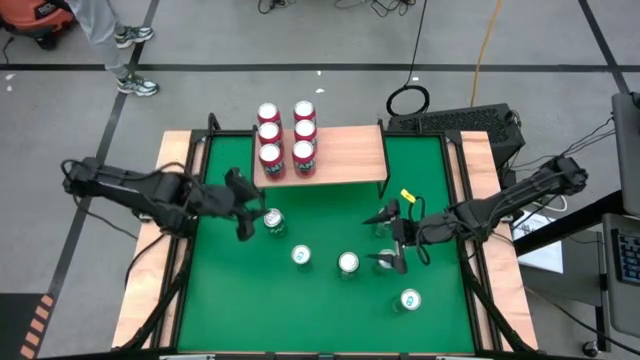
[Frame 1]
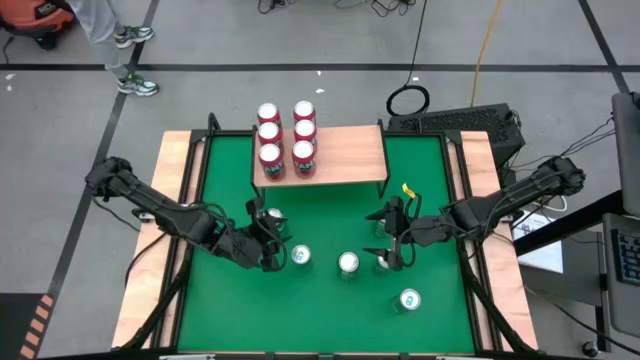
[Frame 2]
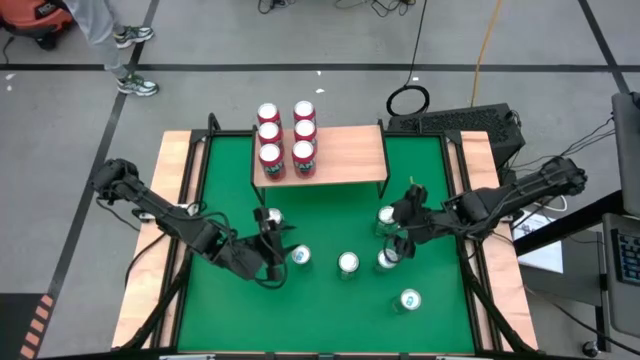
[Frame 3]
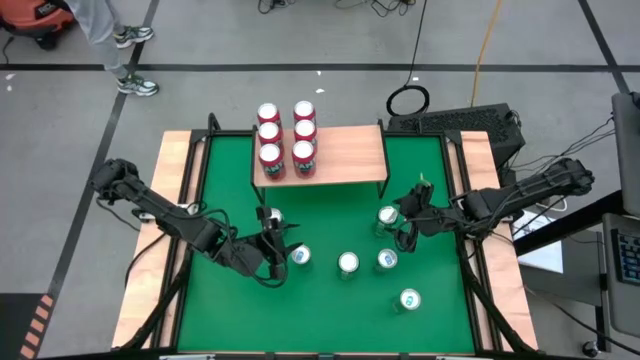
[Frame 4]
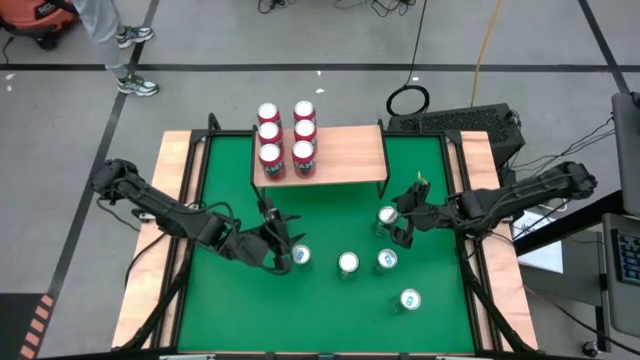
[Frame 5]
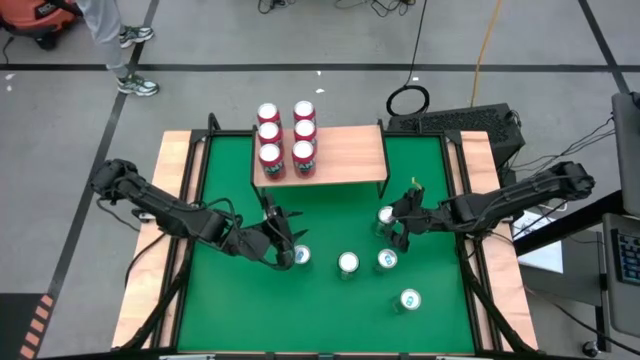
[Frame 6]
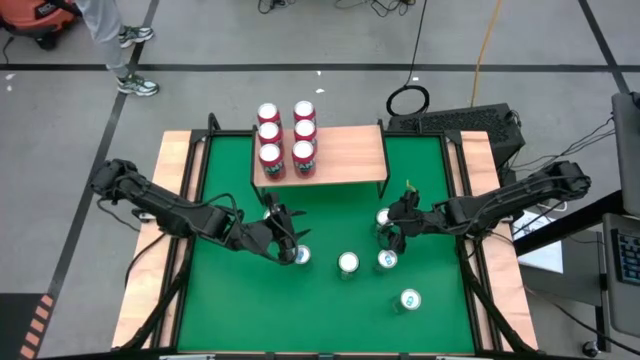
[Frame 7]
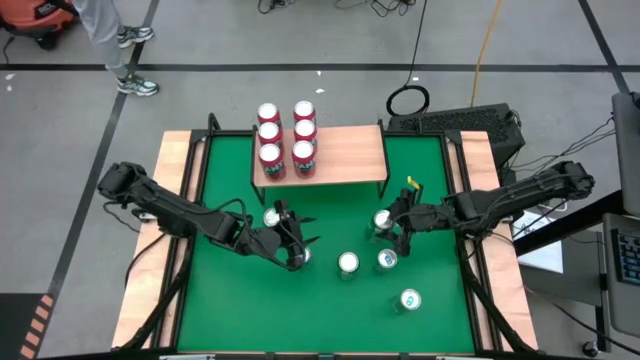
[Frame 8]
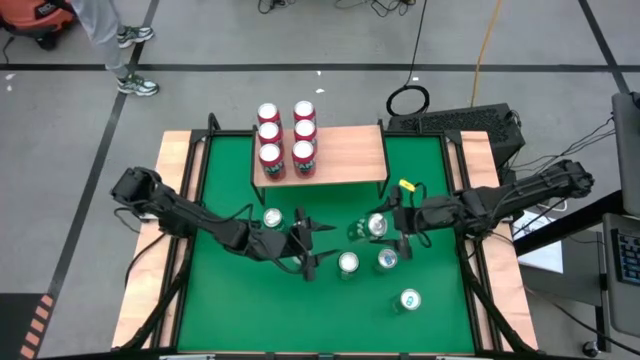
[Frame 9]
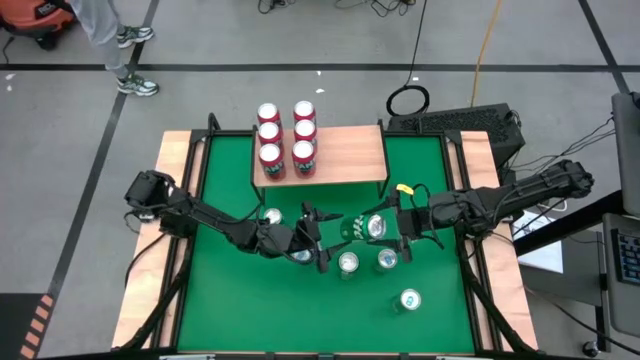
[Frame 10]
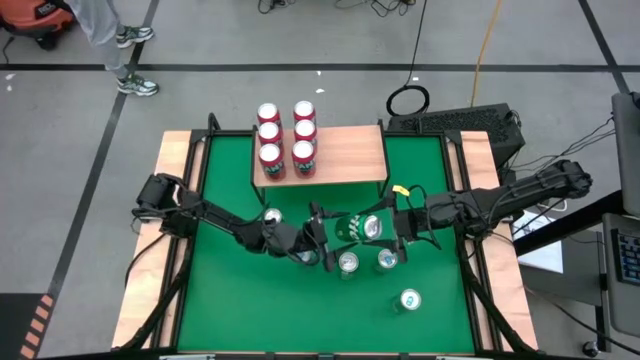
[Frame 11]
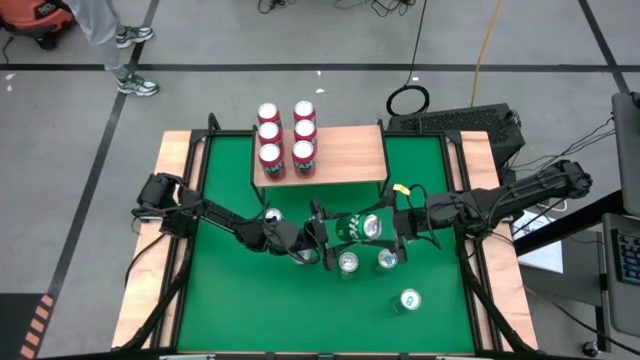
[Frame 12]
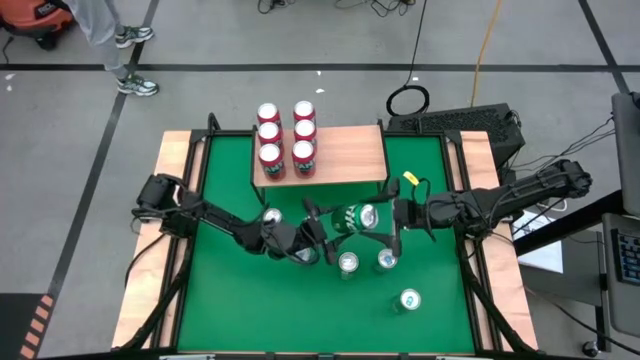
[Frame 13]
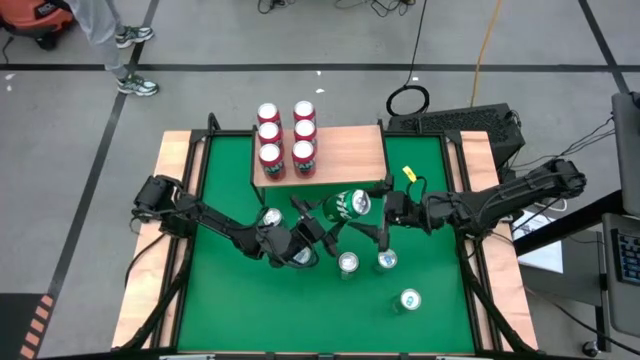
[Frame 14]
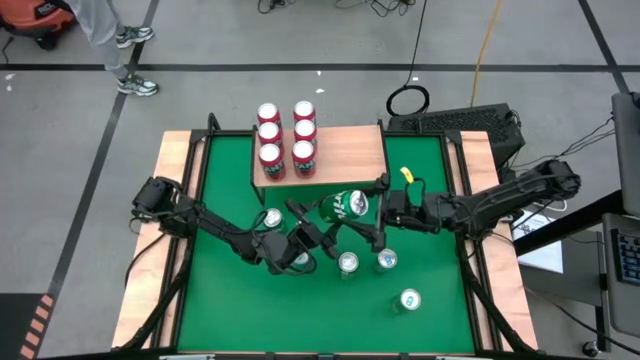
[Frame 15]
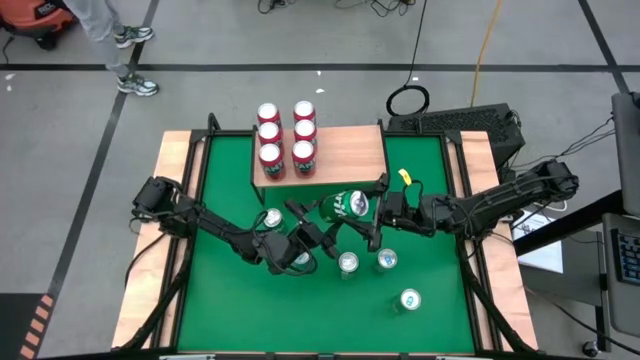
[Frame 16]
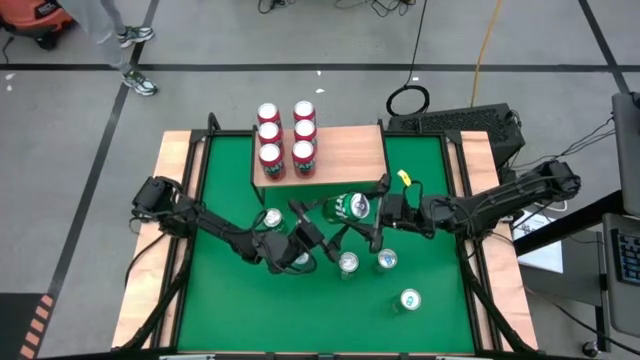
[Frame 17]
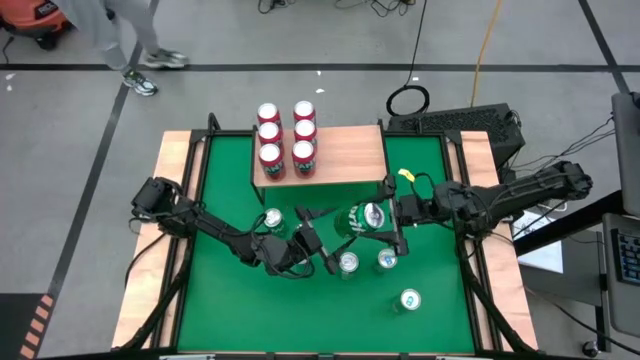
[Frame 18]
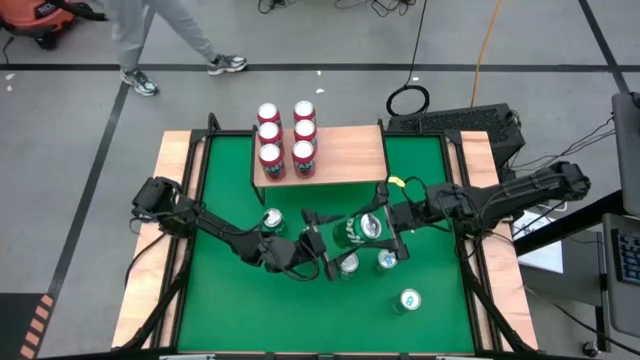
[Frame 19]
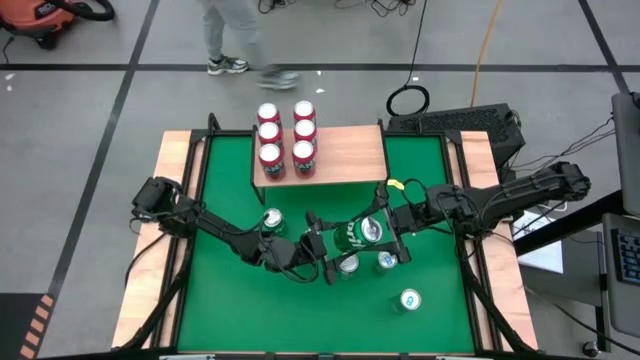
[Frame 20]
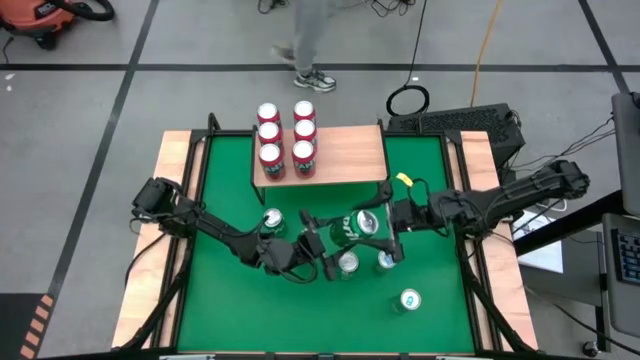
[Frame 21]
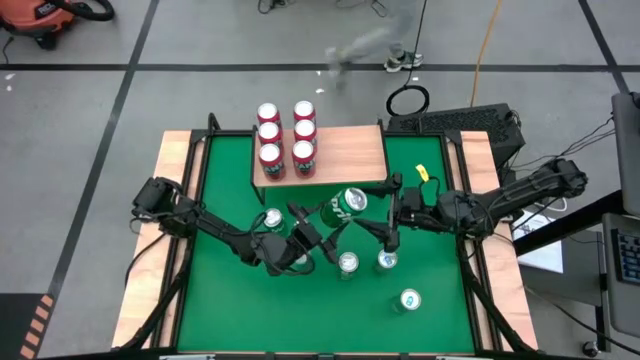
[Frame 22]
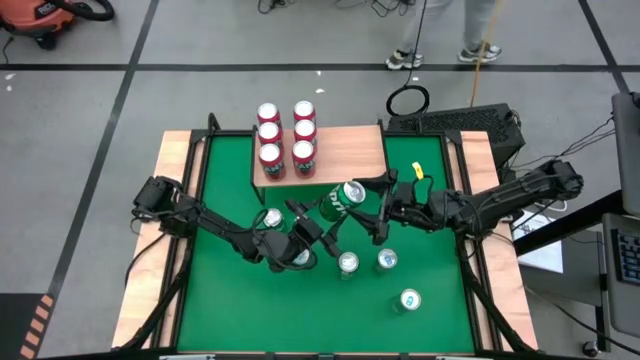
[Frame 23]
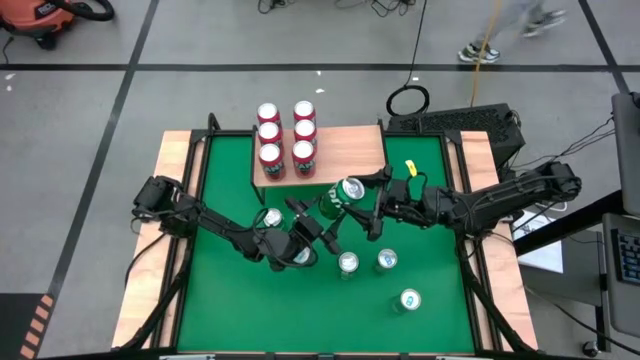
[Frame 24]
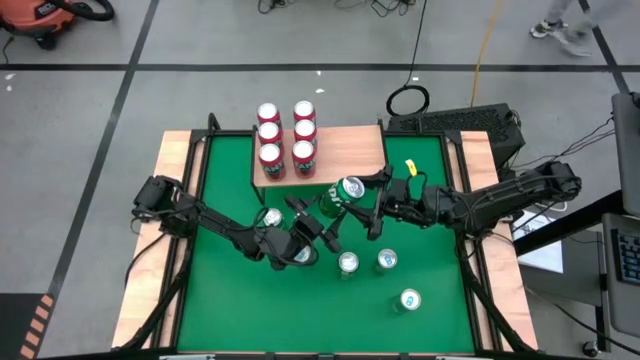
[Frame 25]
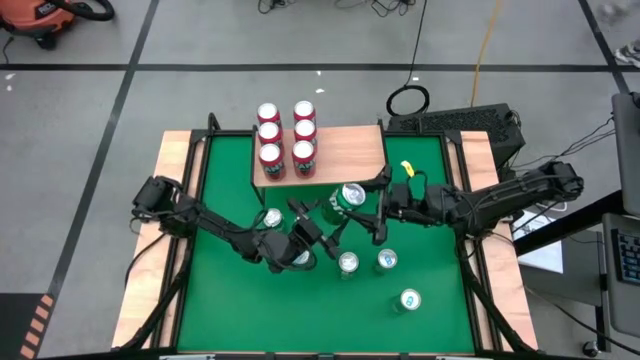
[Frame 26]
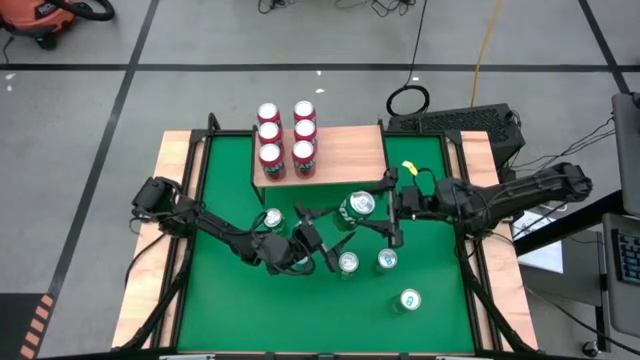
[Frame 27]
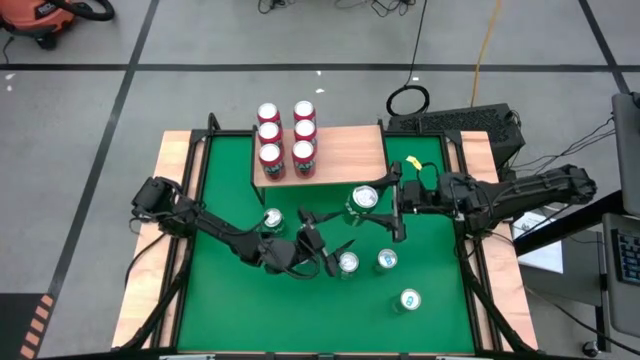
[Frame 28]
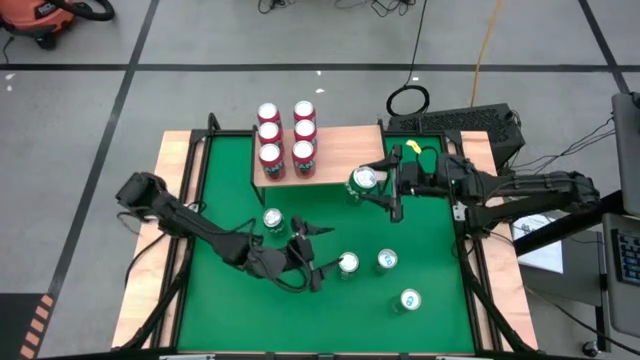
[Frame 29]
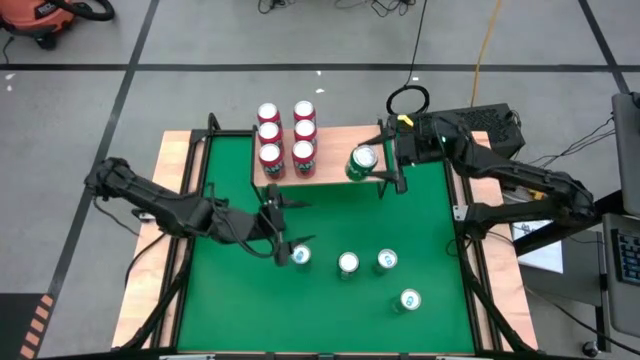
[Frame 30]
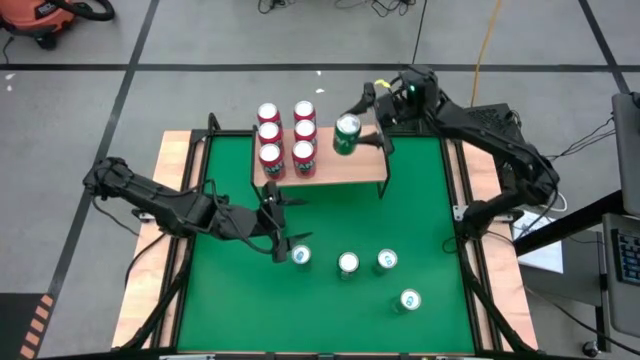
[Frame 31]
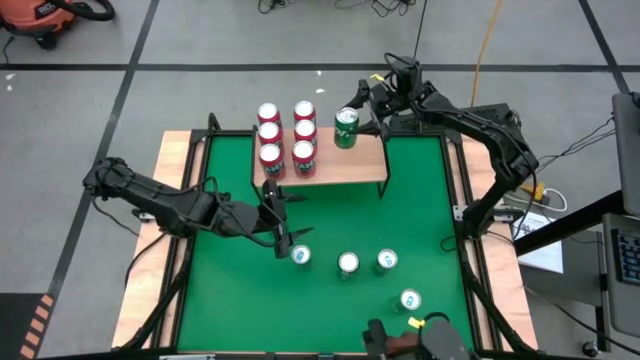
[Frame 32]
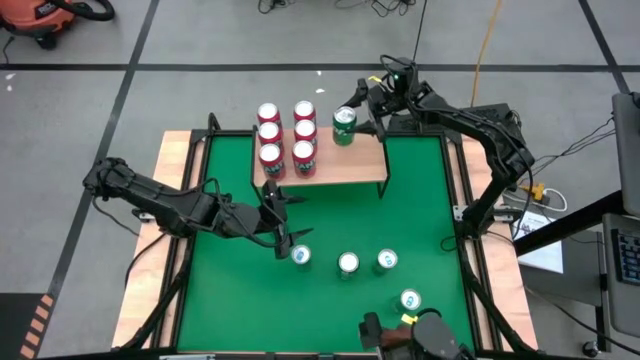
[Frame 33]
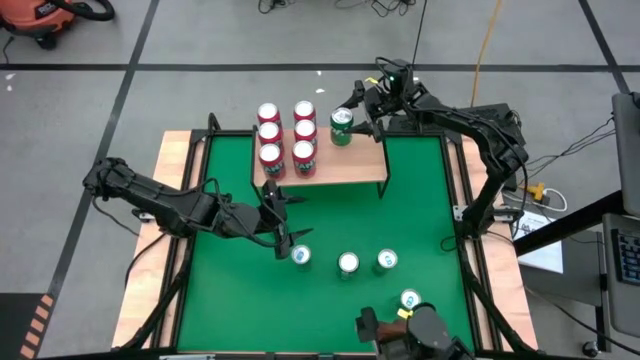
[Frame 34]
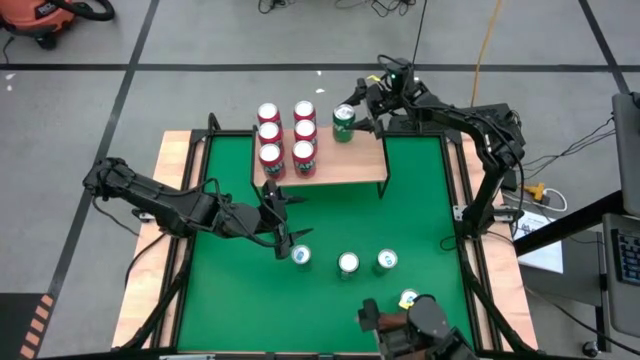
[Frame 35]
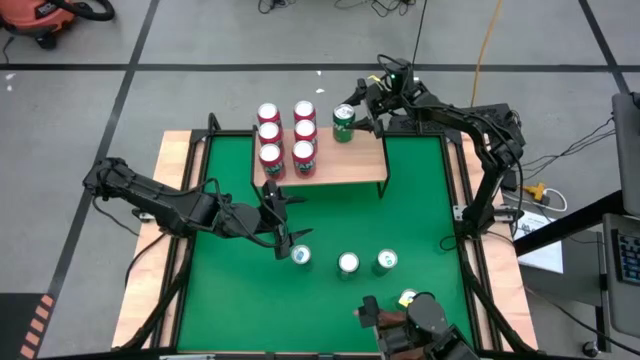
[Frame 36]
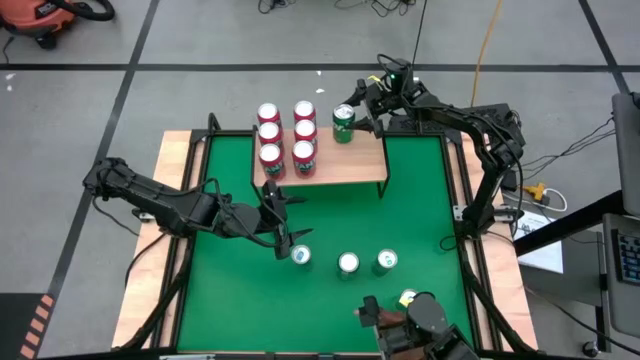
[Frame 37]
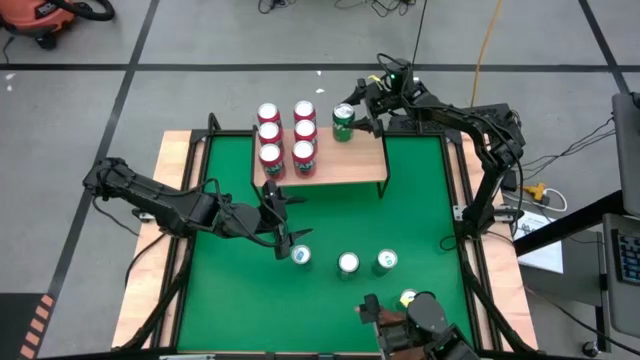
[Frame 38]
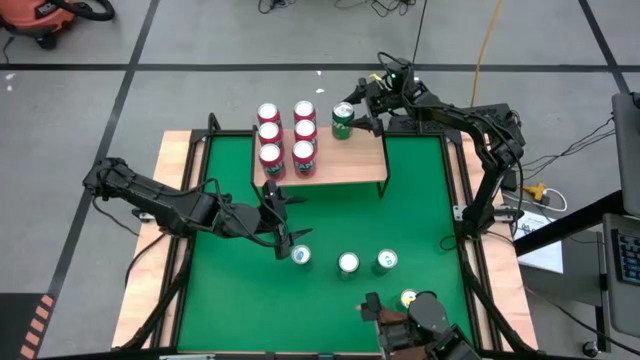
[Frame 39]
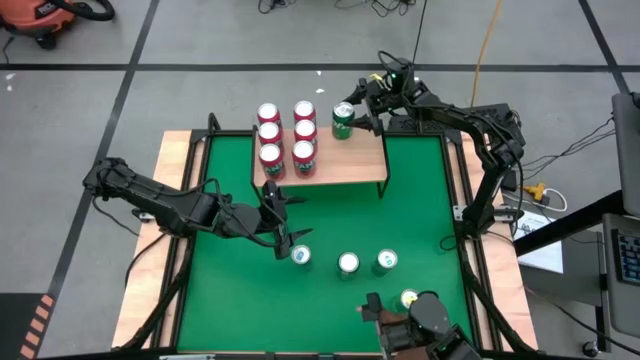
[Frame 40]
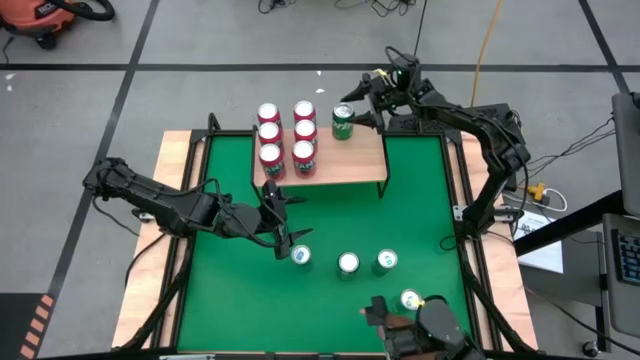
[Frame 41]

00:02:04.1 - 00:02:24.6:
Task: Place canned beverage on shelf
Put the green soda can on the shelf

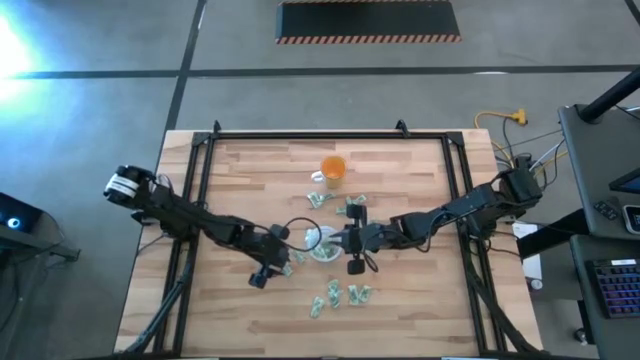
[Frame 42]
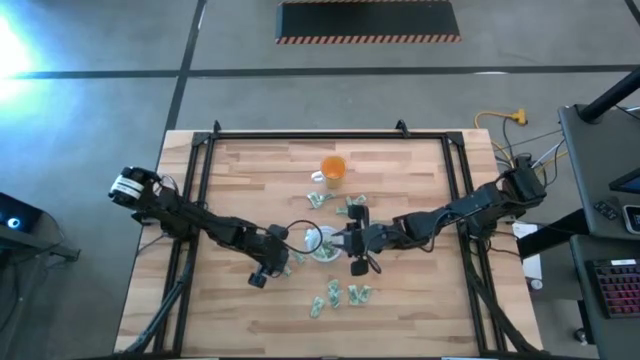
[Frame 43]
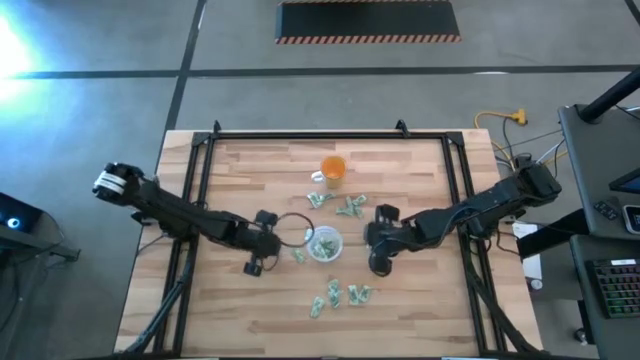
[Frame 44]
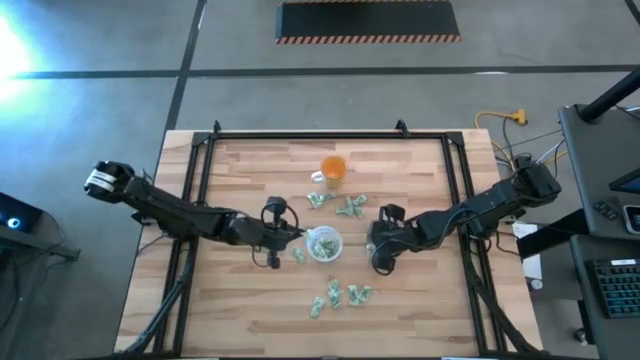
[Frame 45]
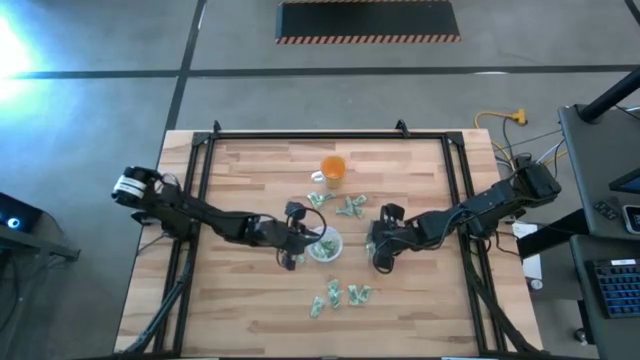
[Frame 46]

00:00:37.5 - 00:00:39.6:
Task: Pick and place Stevia / Truvia into bins
Put the green stevia packet into the transparent container
